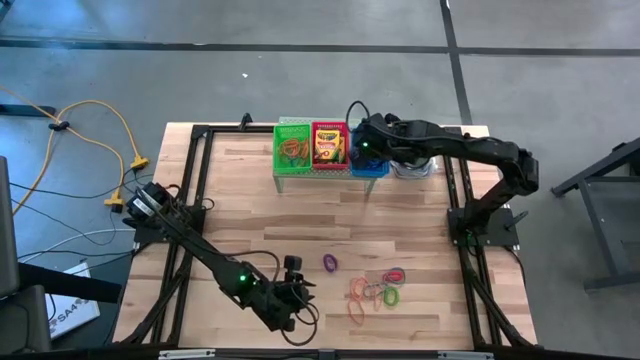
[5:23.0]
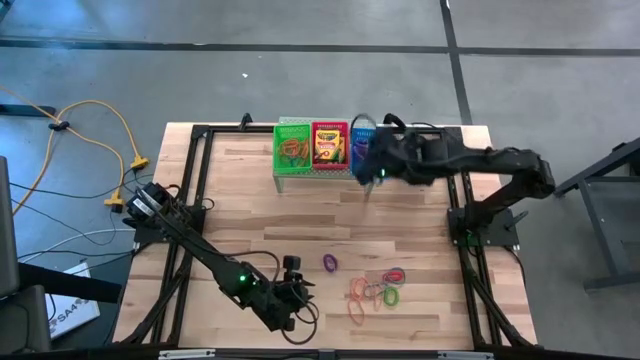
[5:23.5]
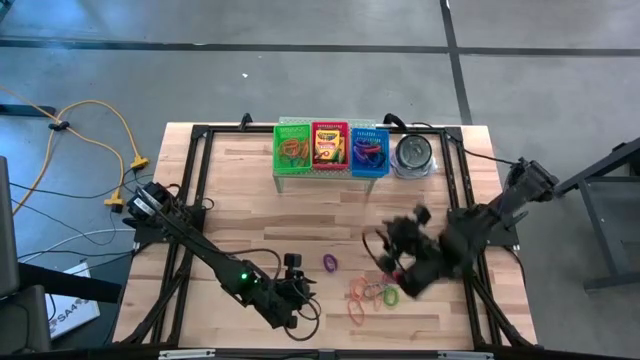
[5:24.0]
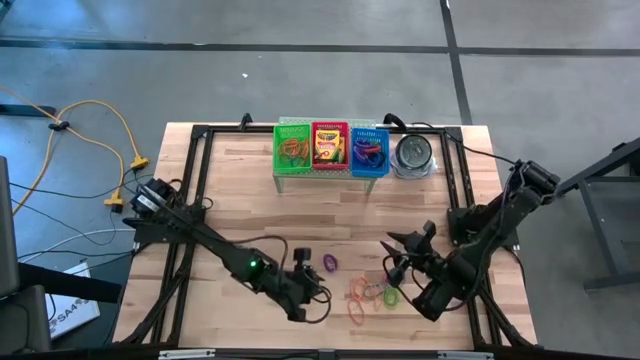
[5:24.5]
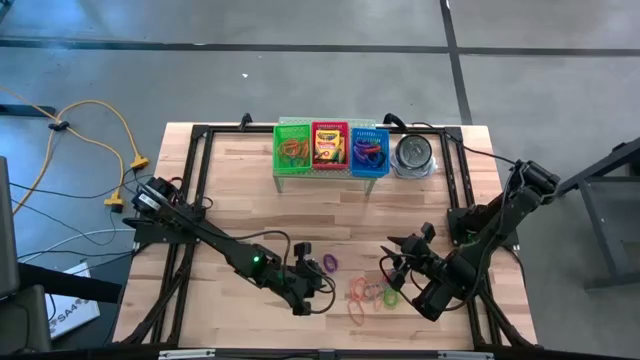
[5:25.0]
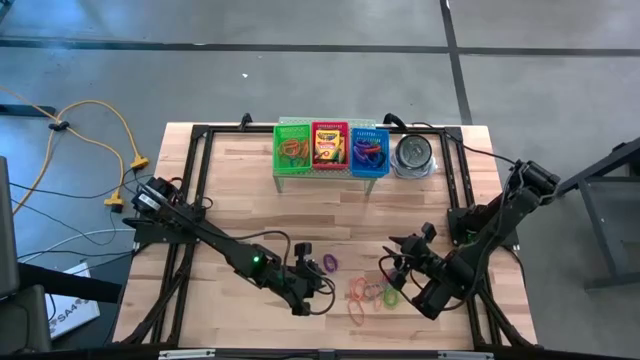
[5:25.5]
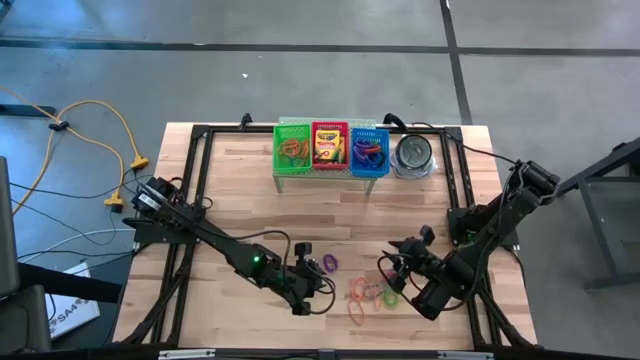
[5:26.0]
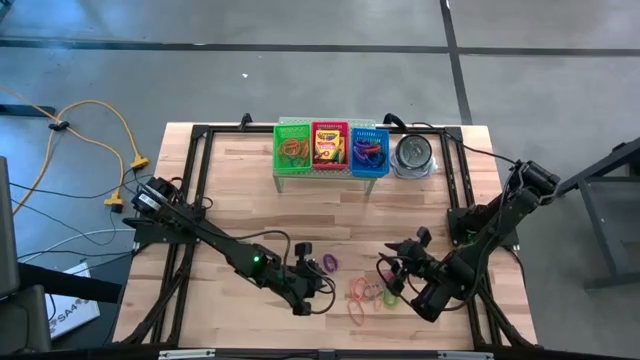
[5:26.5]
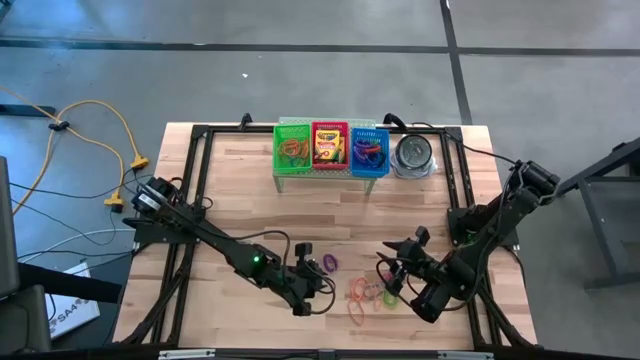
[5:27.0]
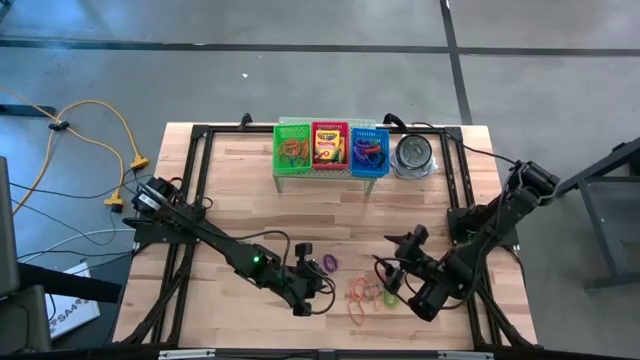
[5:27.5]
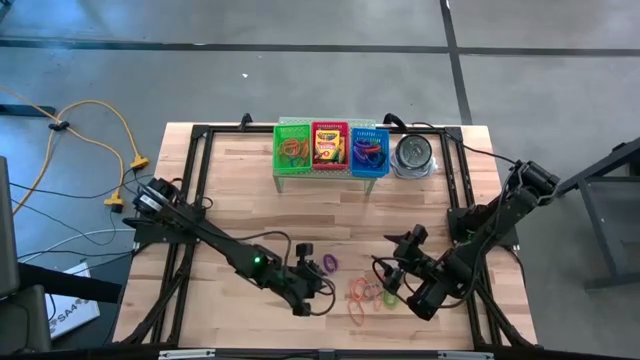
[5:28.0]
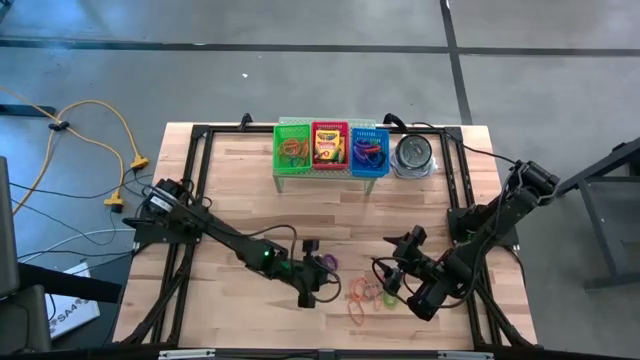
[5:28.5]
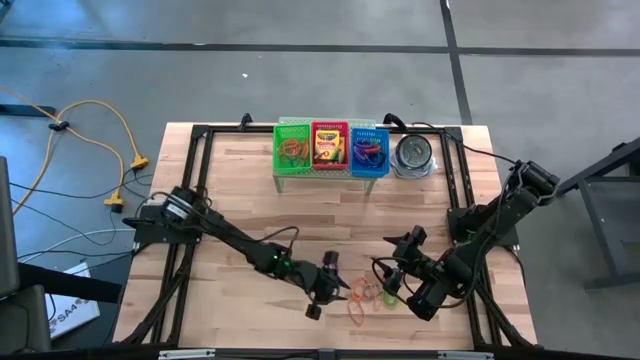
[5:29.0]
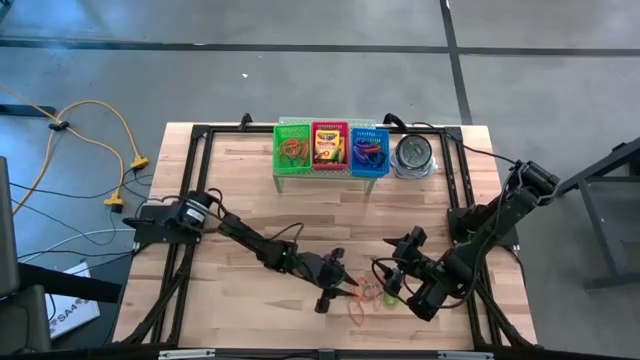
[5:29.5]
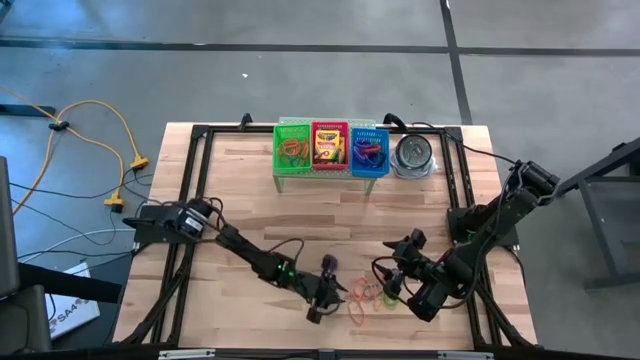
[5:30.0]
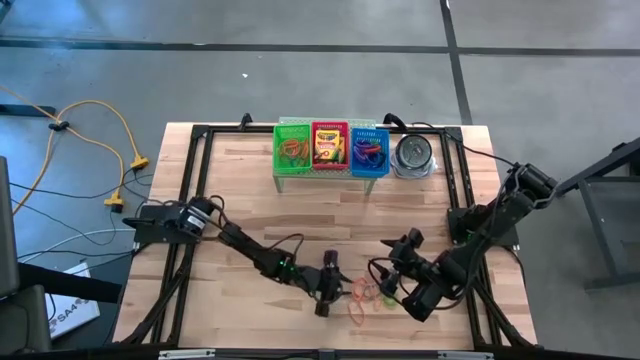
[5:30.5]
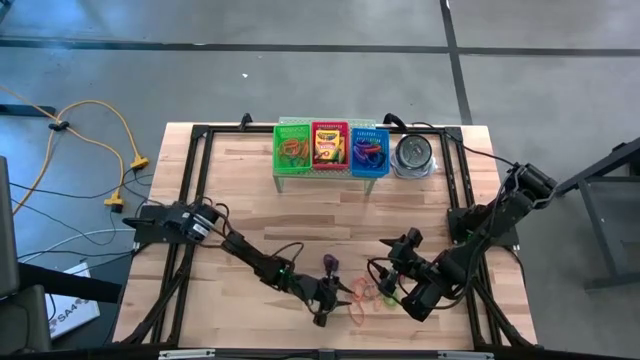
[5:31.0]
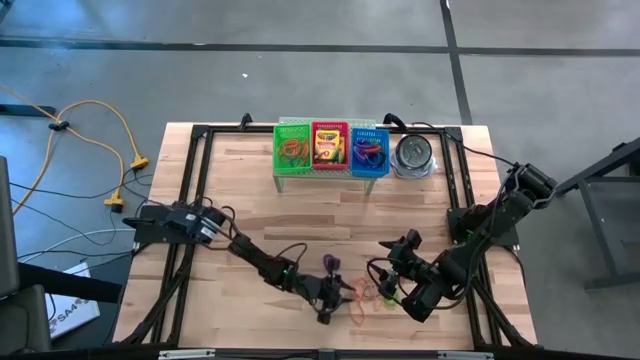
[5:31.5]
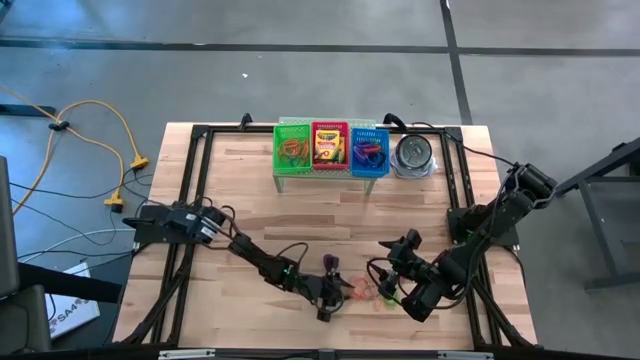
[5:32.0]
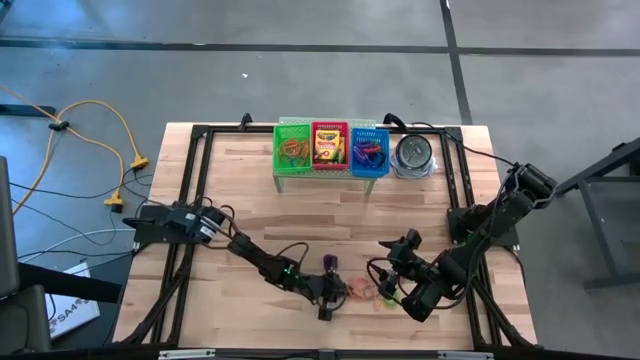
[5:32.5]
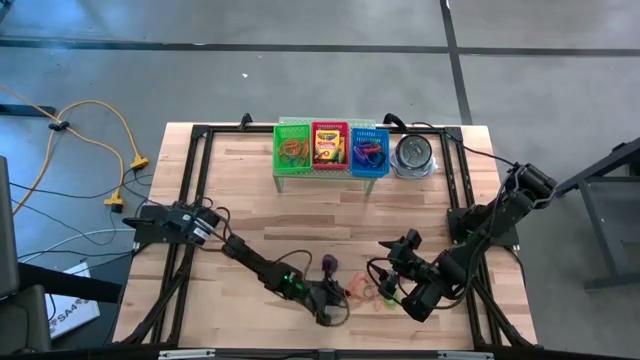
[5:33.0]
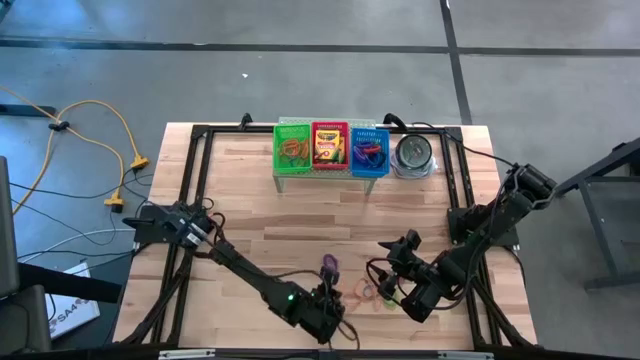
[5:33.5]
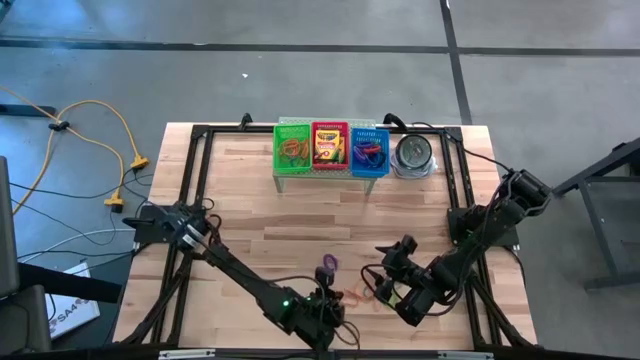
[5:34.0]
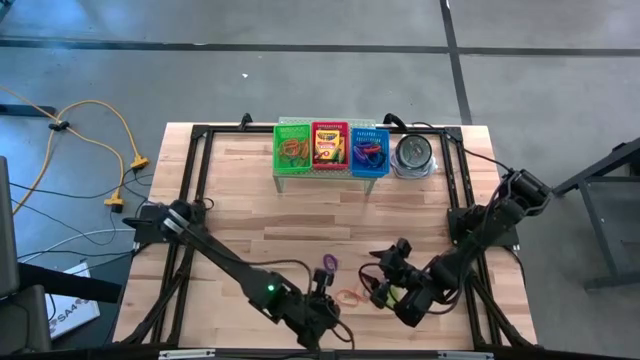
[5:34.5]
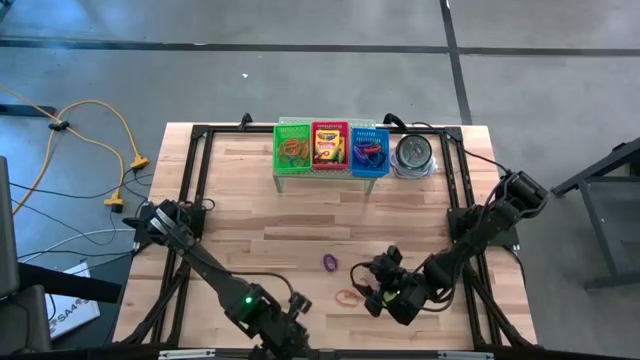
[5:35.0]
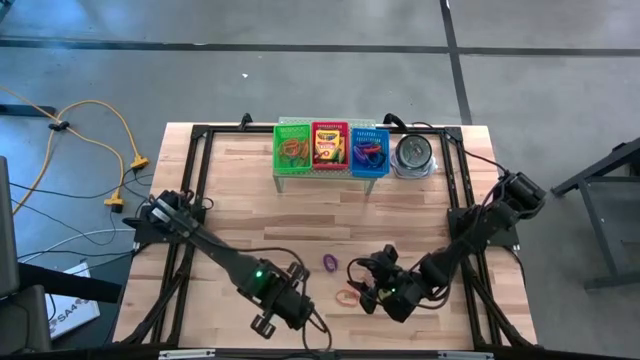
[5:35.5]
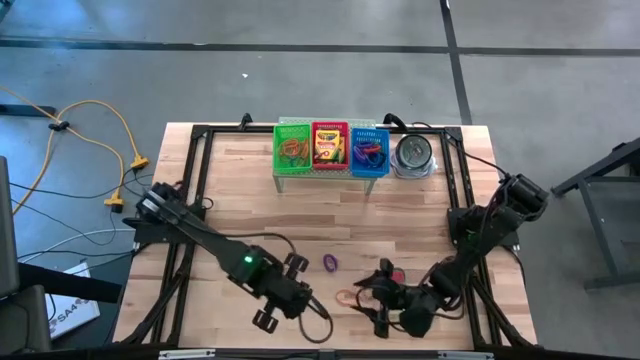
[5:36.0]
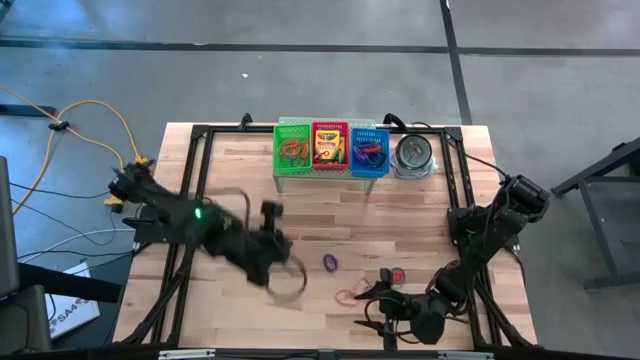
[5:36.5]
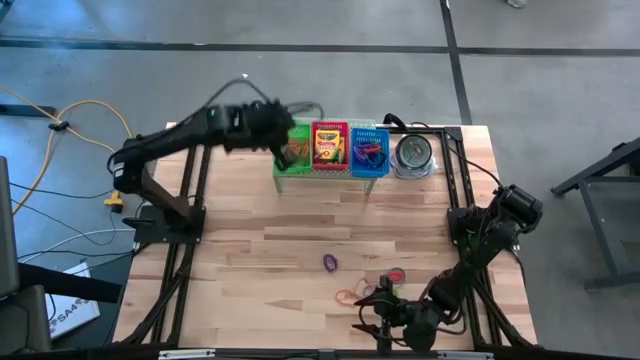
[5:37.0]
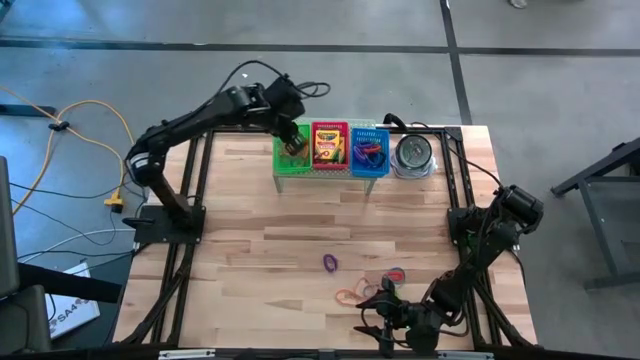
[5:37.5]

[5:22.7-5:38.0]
Task: Pick & Place Office Desk Supplies
Put the orange rubber band into the green bin on the shelf
